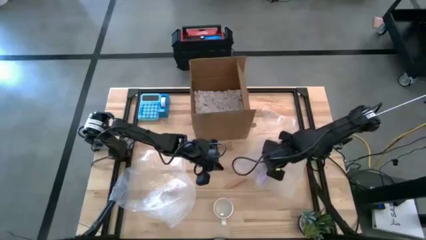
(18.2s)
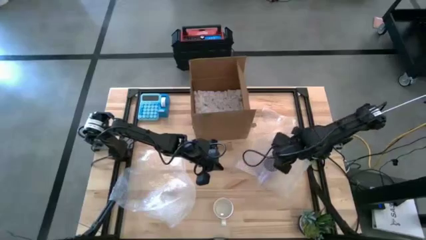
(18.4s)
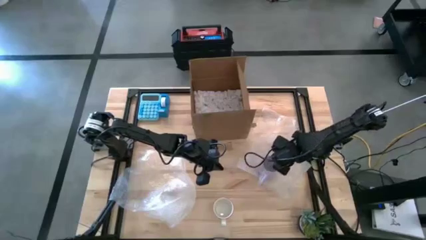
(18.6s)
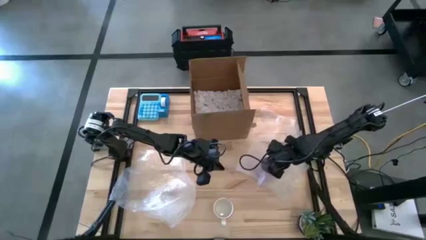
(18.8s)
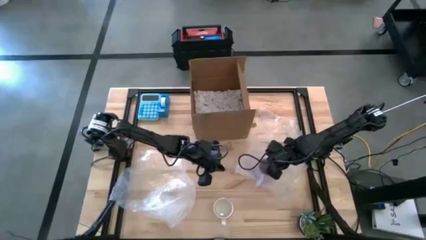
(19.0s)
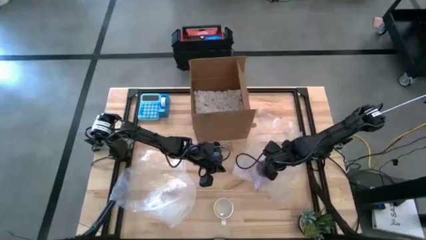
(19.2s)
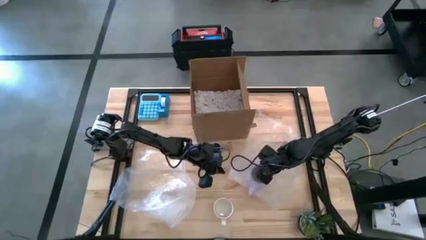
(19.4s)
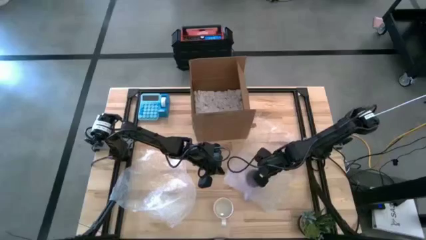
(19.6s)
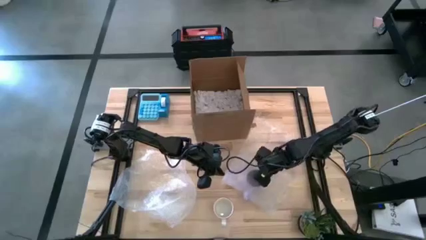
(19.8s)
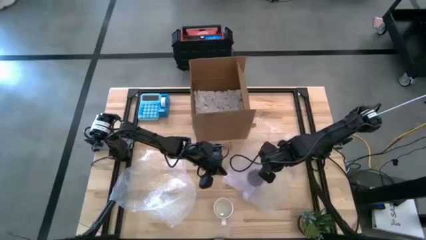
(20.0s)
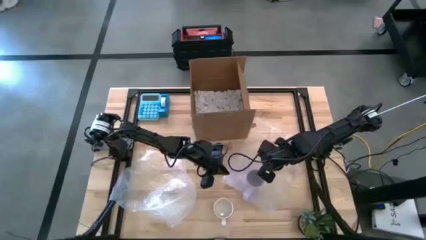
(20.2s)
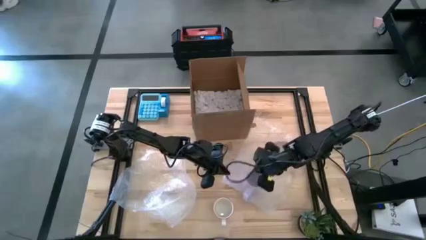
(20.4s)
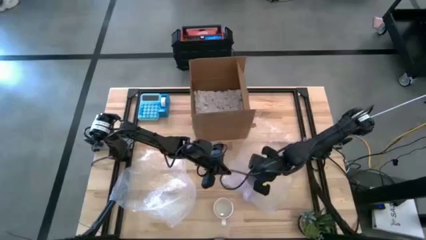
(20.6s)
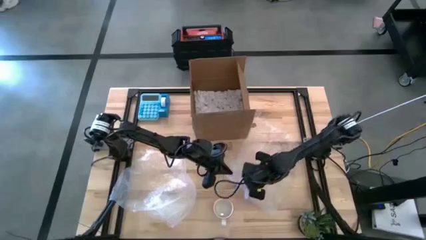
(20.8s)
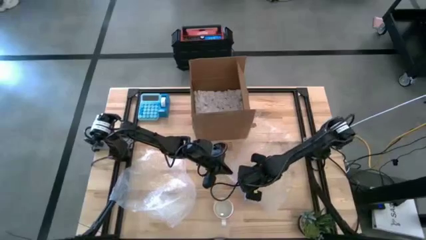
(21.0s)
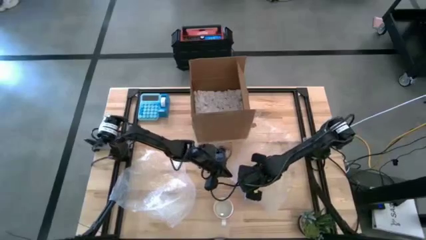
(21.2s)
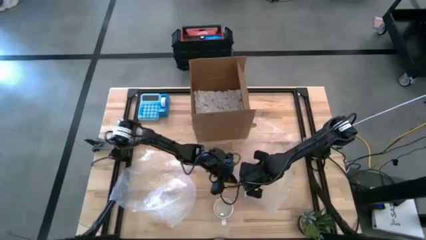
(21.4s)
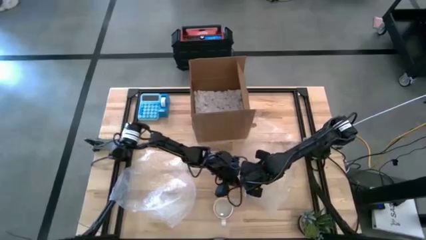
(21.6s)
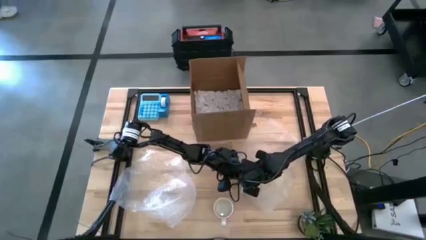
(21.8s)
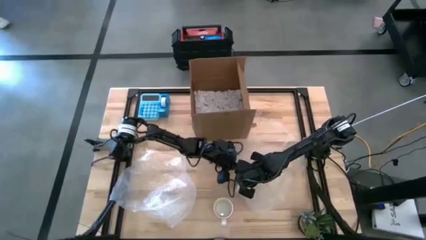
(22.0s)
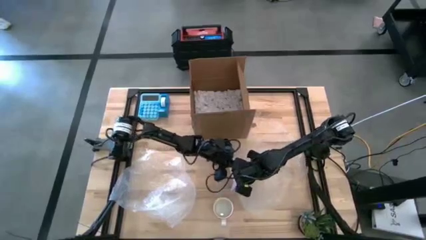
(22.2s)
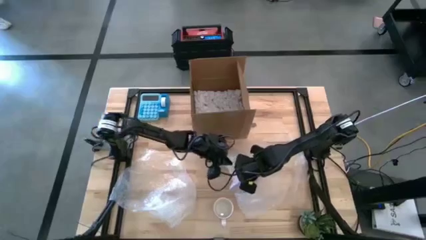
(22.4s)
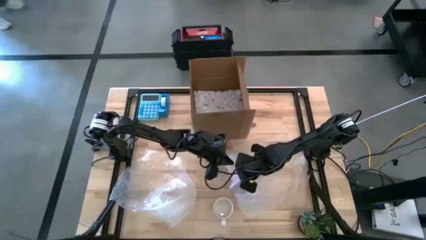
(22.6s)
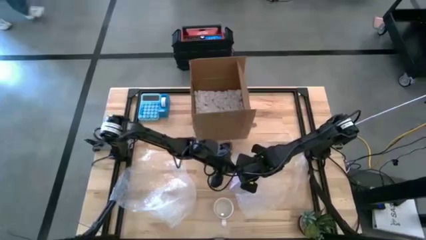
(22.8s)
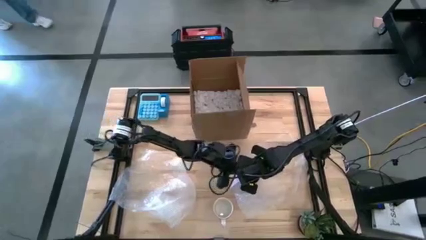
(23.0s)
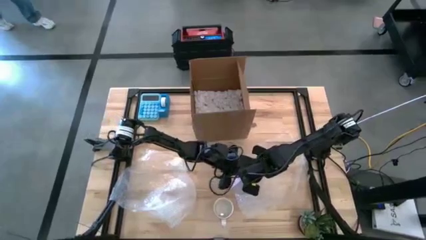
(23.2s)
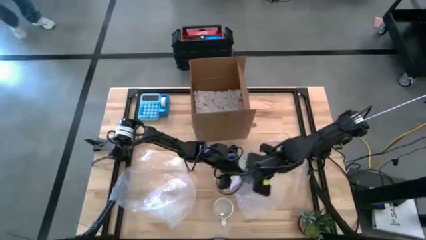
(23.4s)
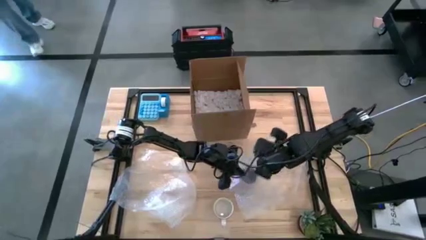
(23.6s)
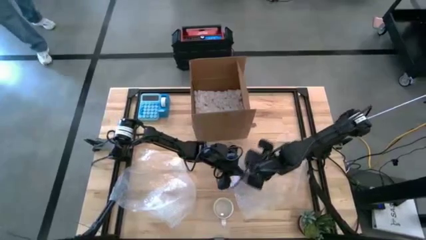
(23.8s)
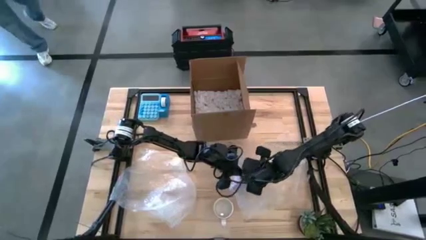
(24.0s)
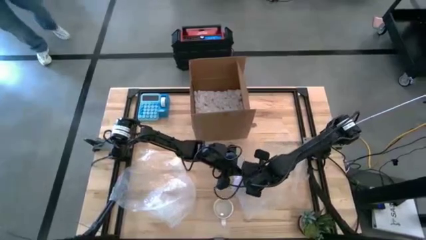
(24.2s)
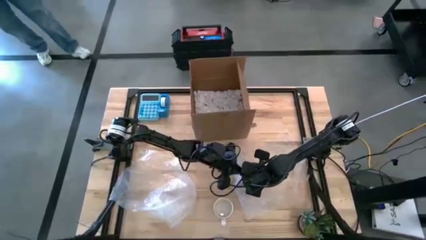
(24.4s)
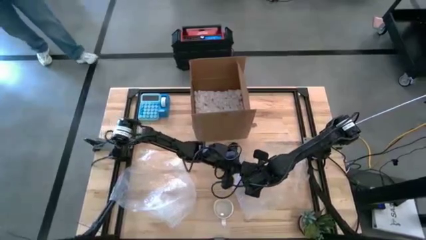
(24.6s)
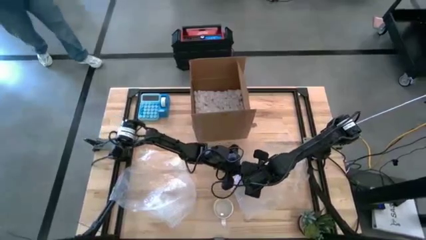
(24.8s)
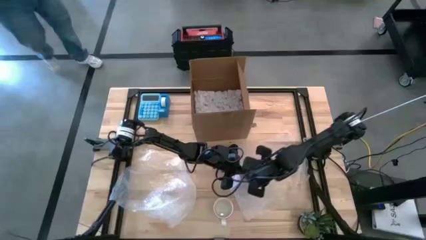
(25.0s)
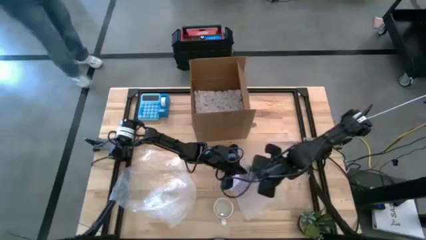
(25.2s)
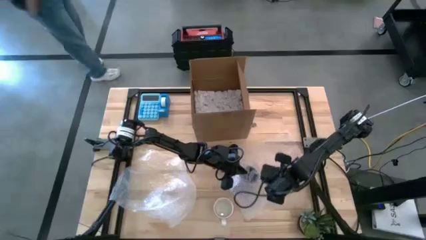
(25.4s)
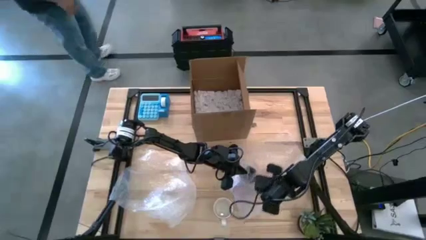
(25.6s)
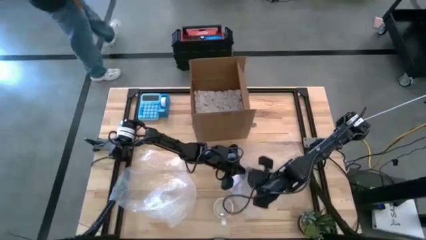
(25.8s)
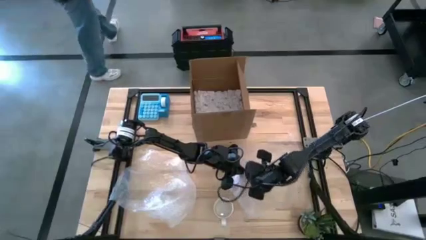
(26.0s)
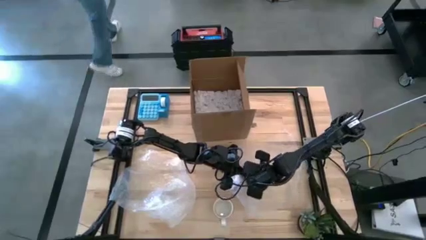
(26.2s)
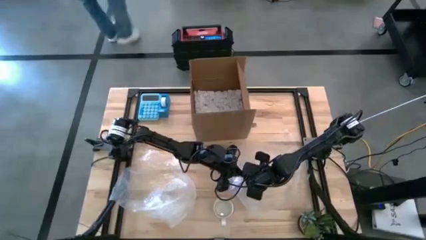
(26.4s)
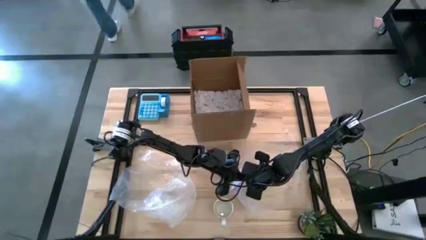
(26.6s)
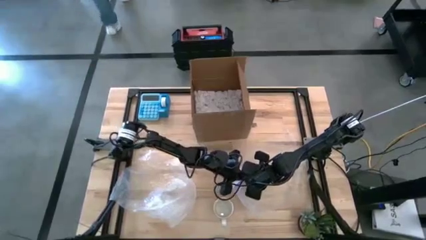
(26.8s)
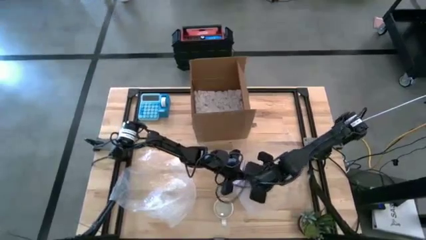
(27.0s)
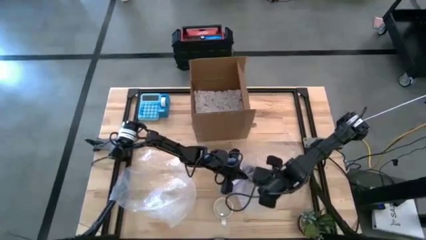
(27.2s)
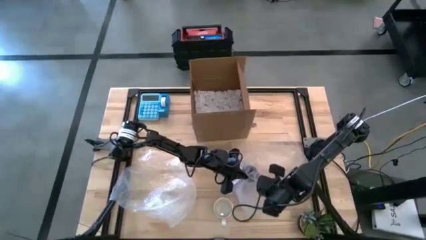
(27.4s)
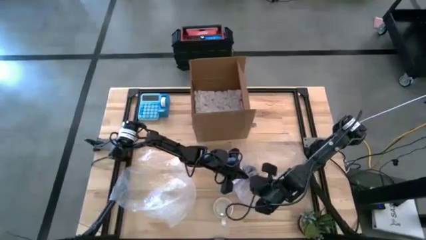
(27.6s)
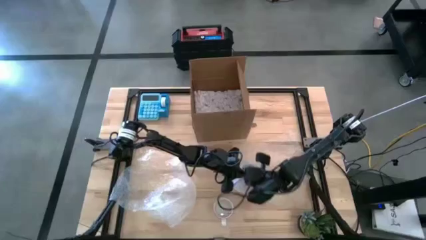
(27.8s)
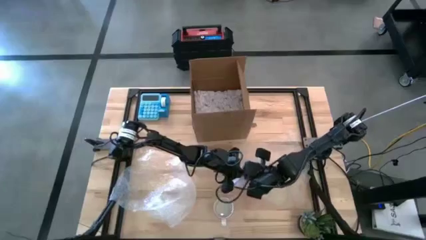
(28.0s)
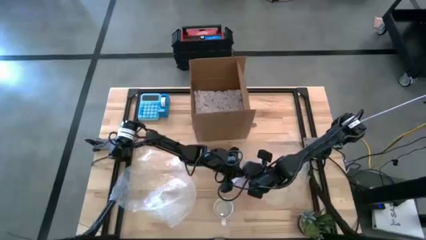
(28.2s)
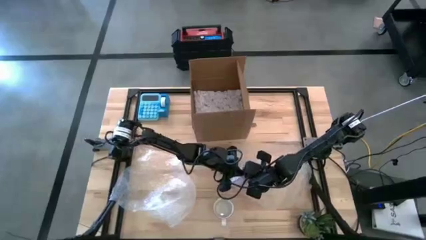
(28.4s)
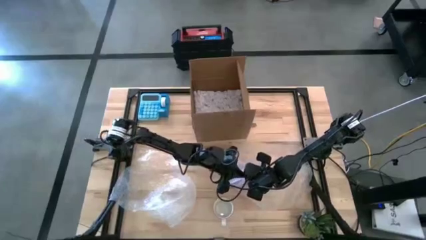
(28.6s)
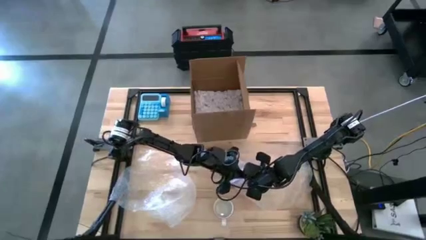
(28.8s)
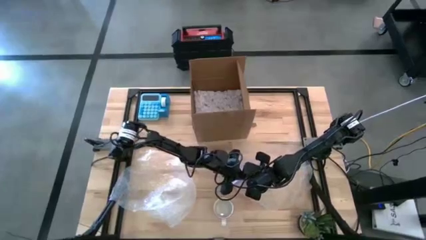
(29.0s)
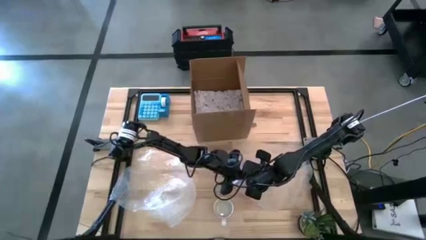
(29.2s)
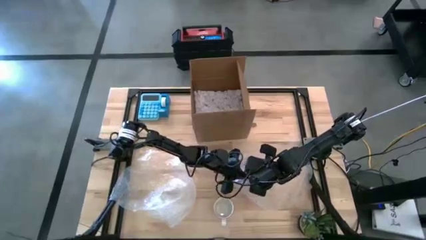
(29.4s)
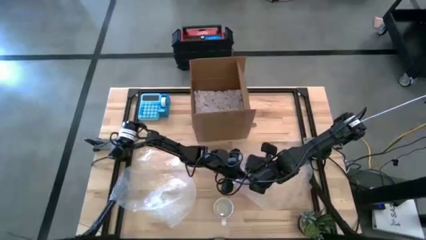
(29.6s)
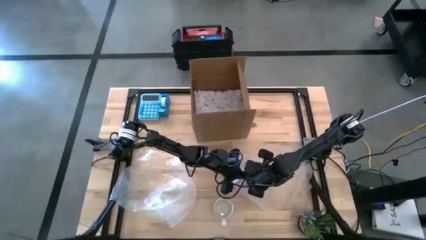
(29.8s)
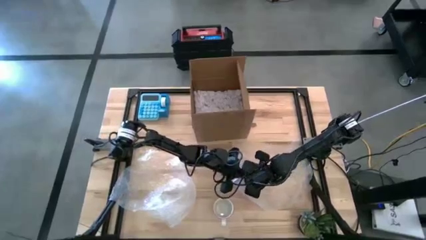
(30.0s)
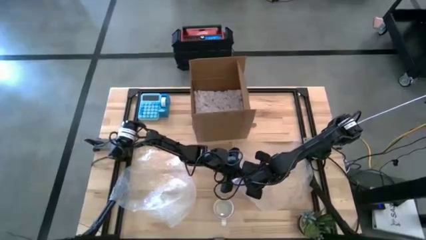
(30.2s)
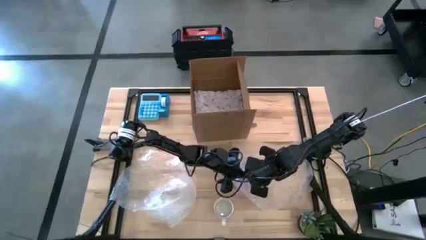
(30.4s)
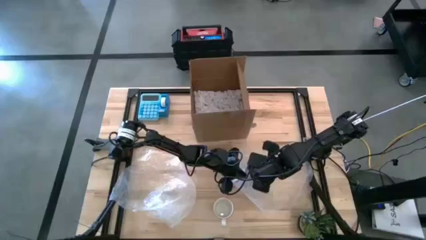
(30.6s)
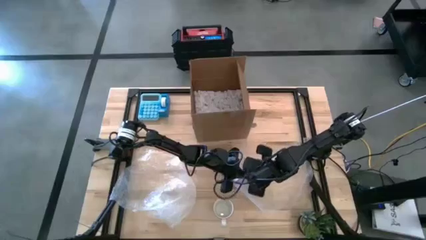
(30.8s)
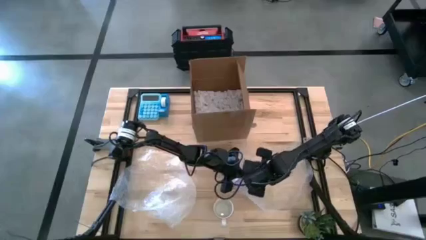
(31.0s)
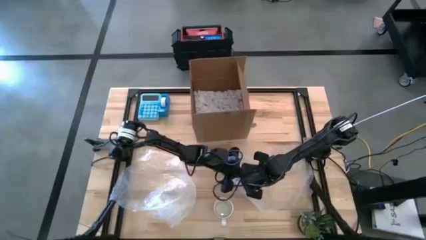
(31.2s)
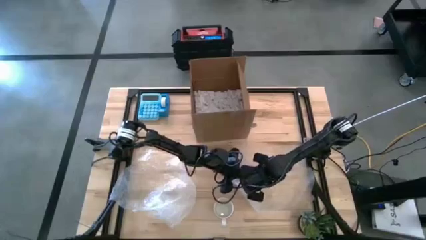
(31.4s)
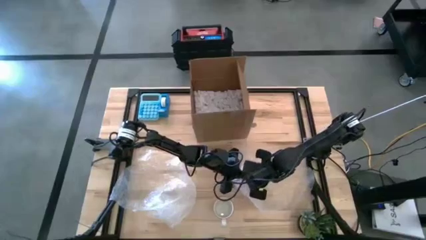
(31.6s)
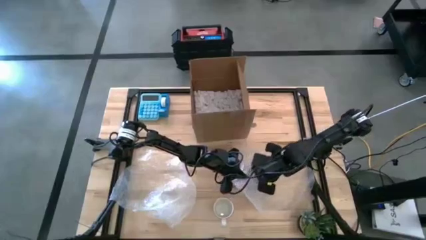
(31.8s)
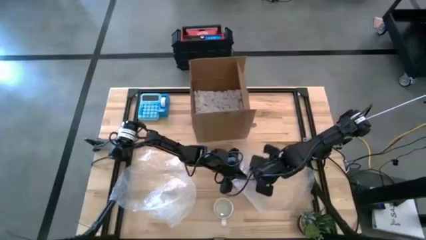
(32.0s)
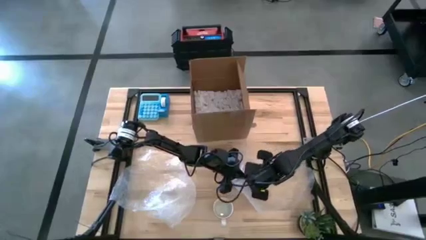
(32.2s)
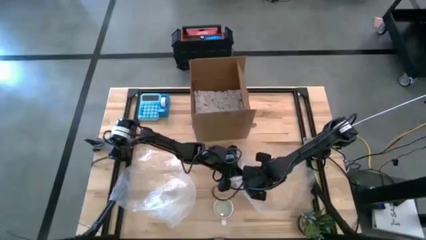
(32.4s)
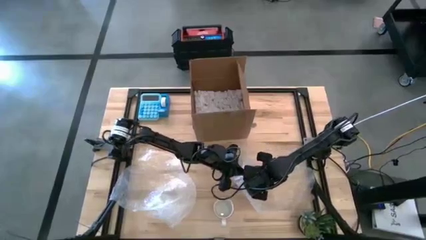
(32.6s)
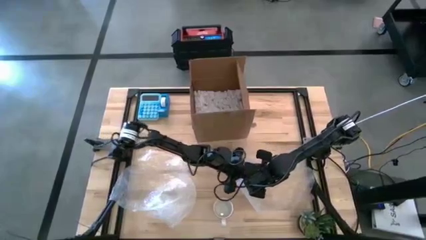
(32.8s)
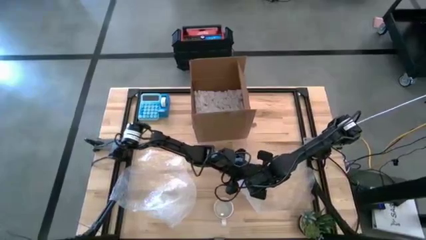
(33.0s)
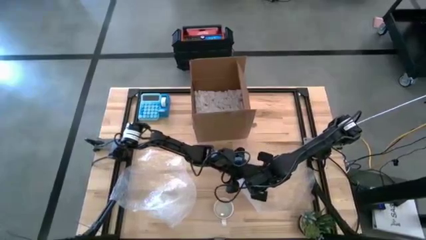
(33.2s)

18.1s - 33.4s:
Task: wrap mug
Wrap the purple mug using the right bubble wrap
